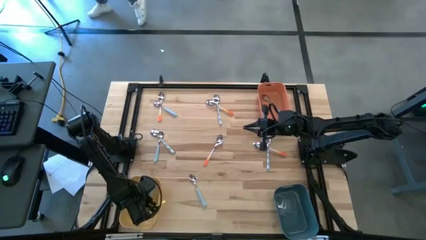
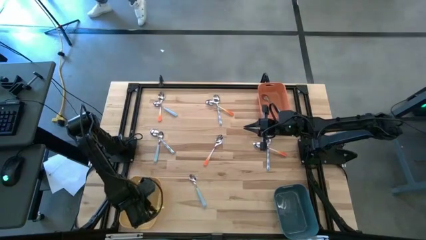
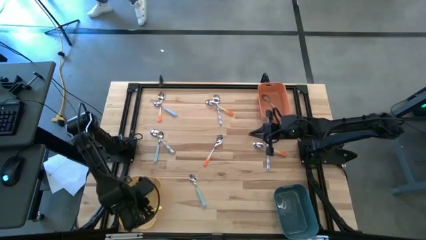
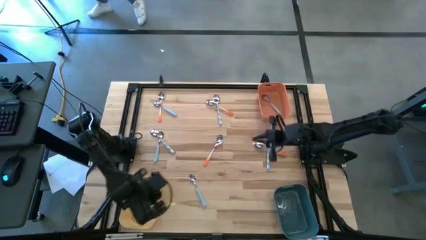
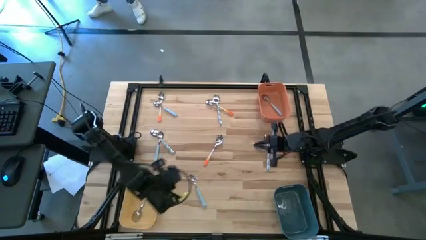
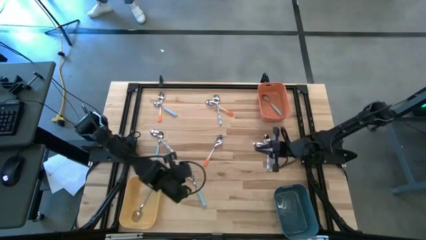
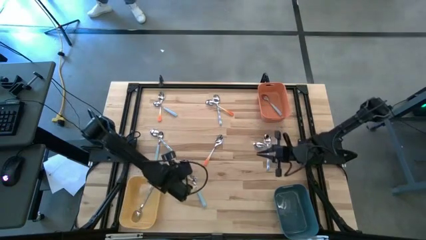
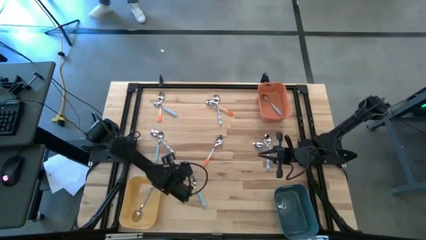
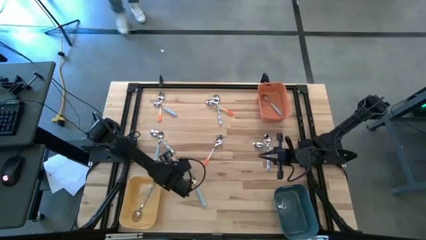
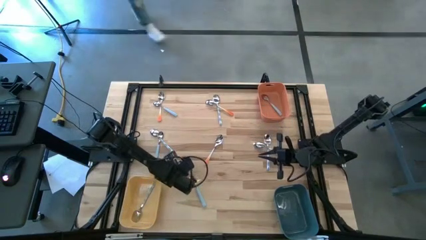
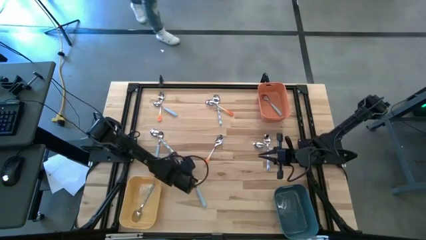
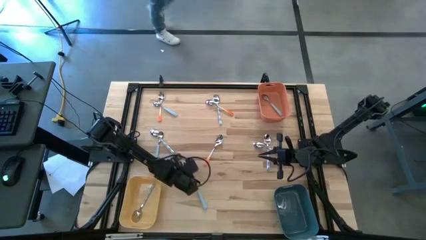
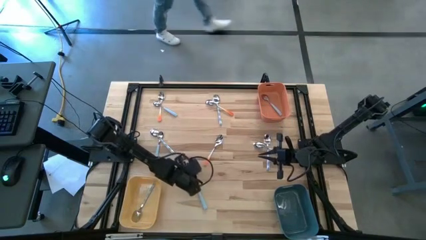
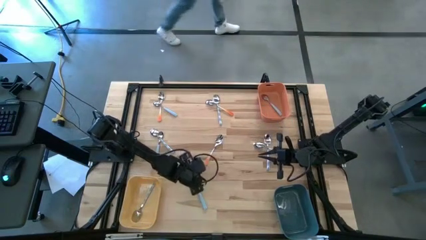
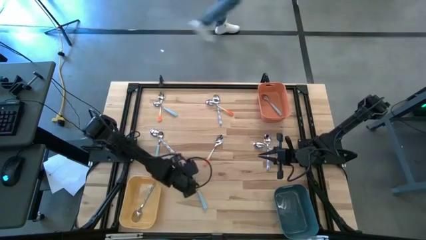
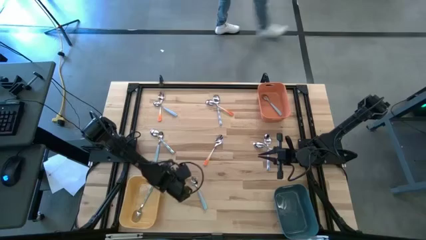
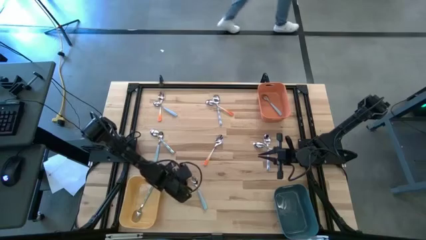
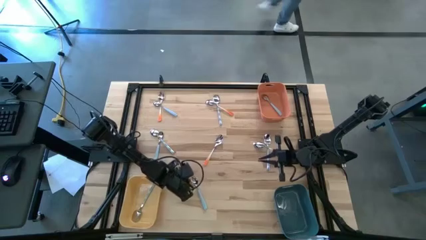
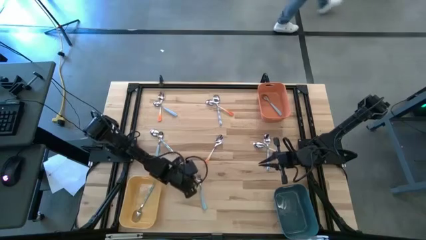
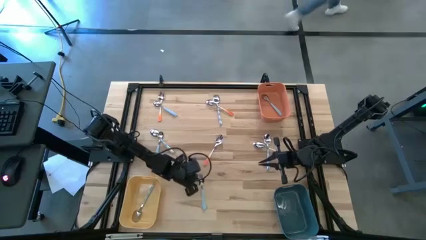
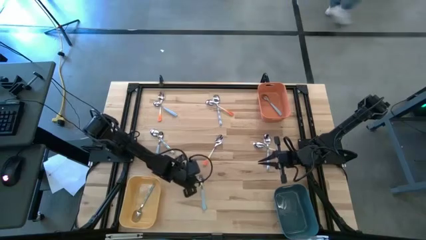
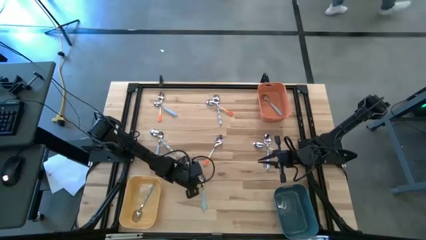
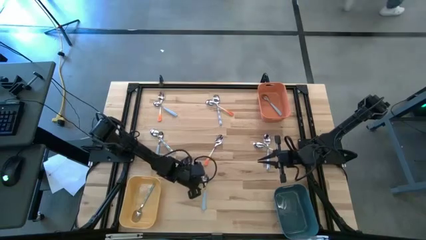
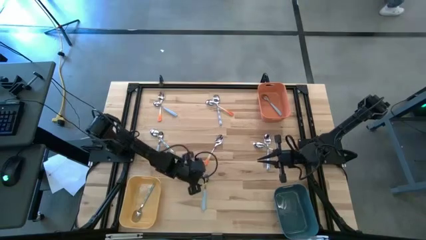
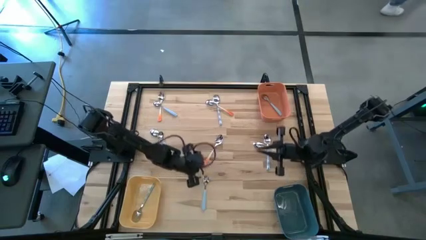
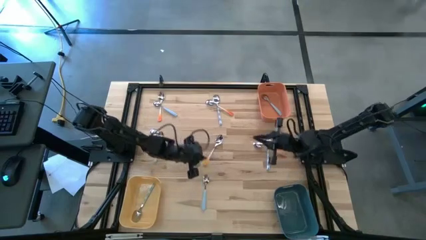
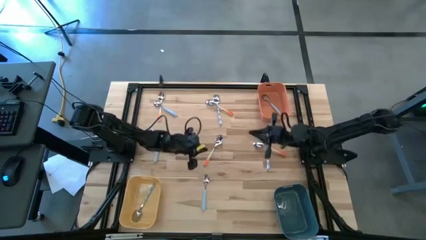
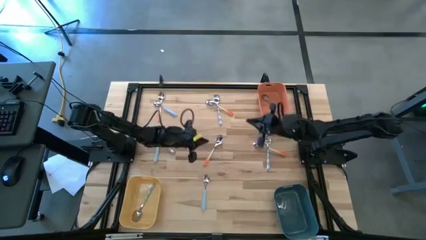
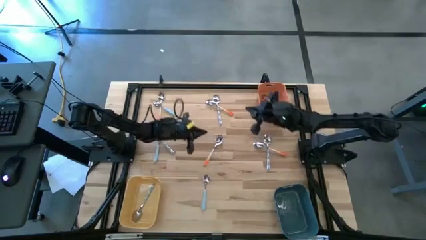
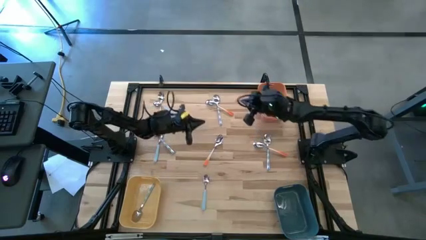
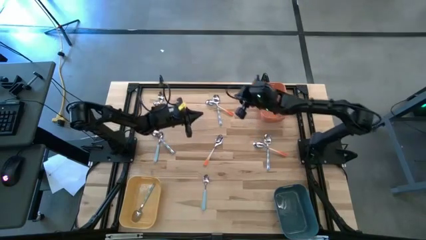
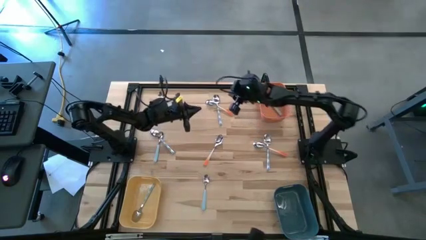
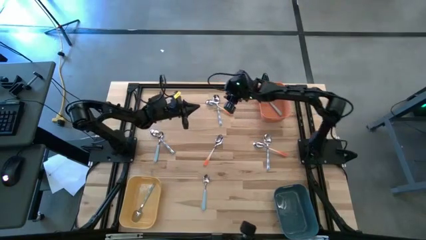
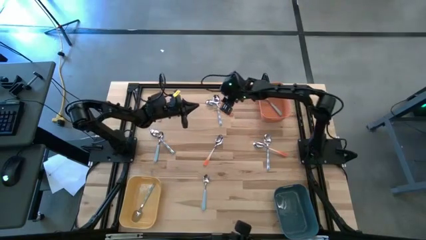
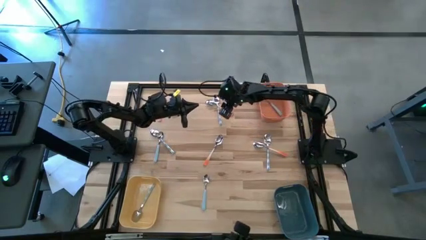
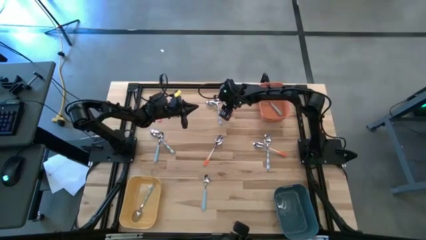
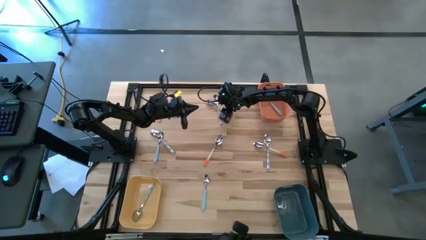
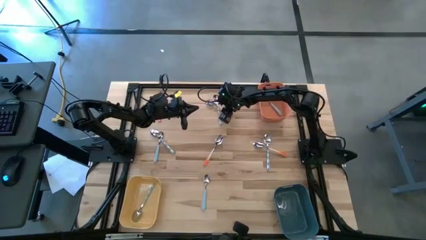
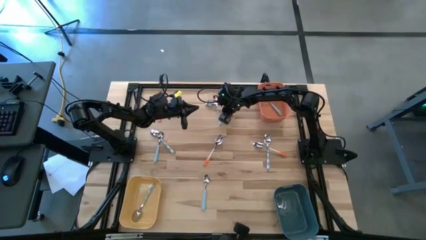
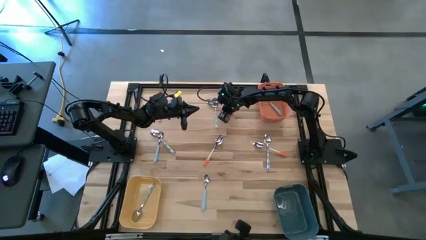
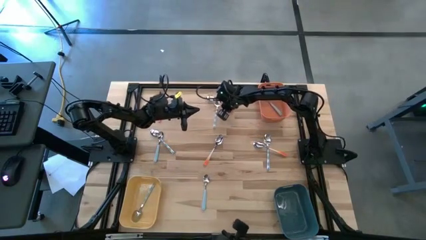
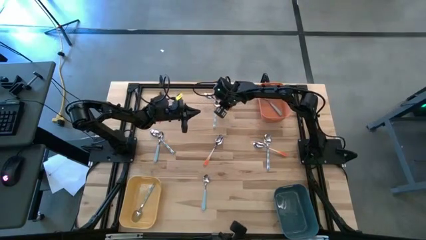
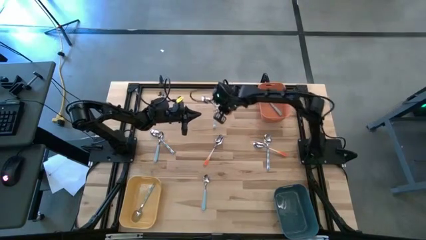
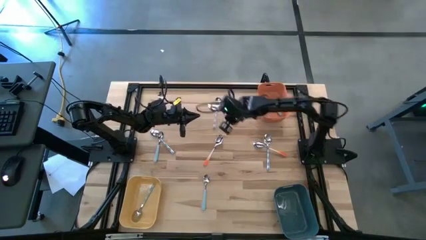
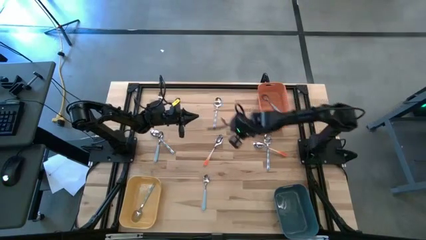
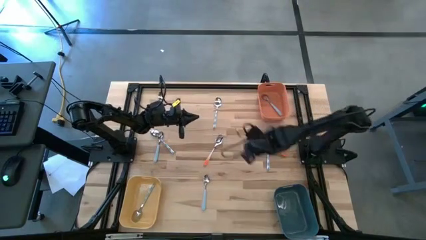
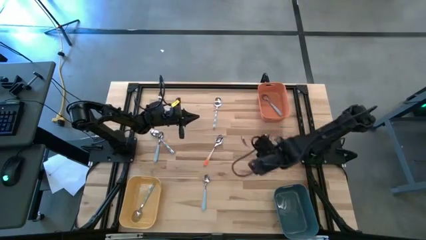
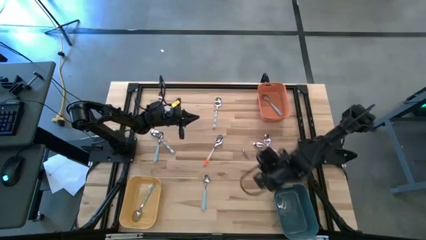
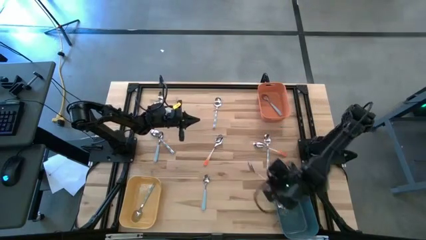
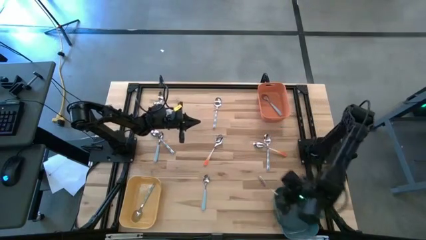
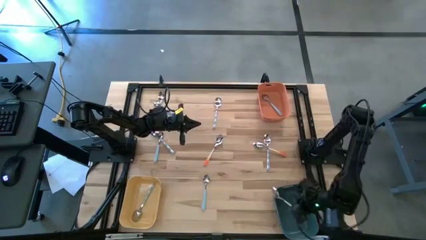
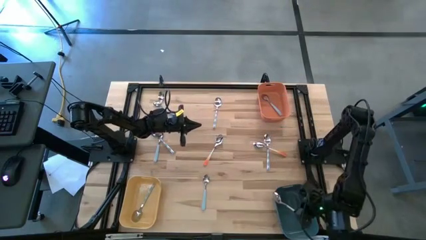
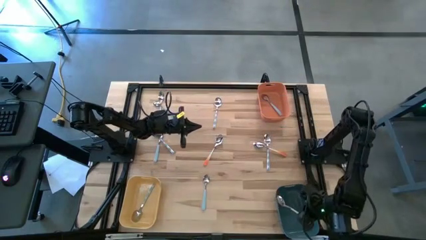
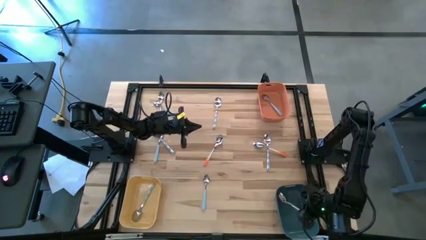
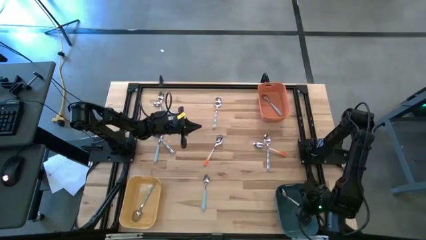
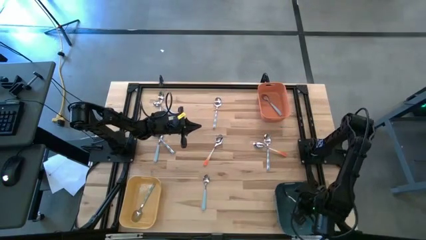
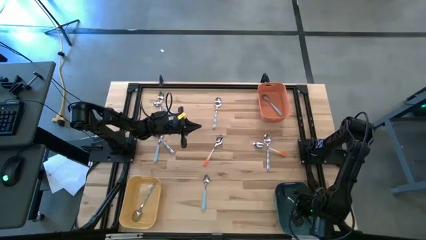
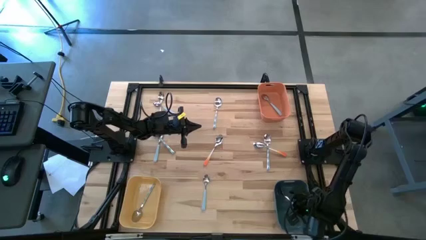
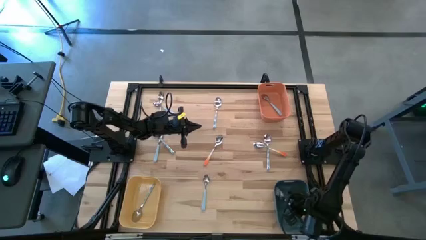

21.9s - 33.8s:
Task: Sort silverware by color (type)
Put the top middle orange spoon into the dark blue bin
